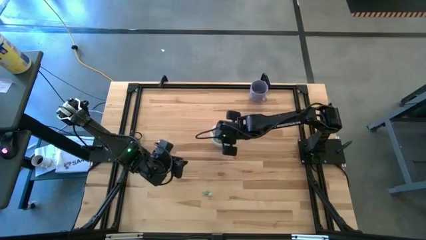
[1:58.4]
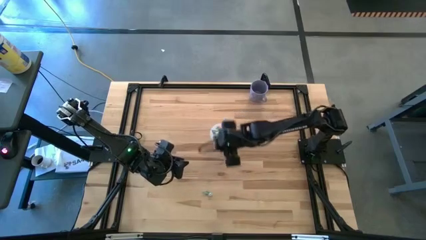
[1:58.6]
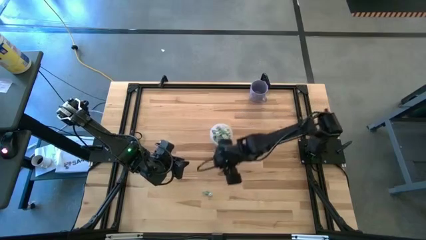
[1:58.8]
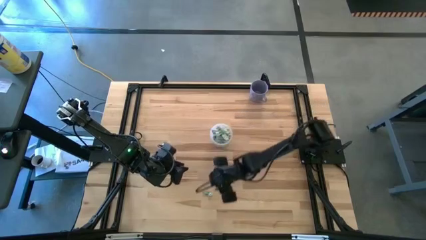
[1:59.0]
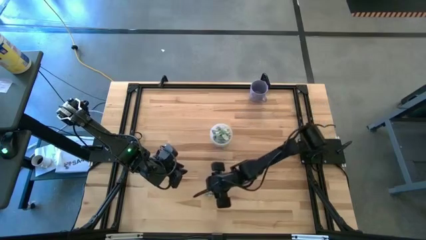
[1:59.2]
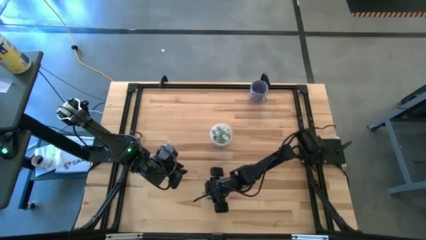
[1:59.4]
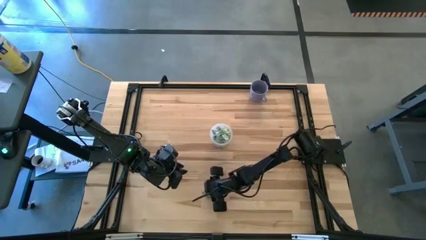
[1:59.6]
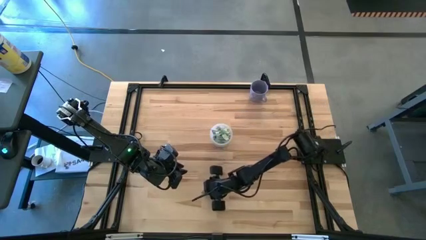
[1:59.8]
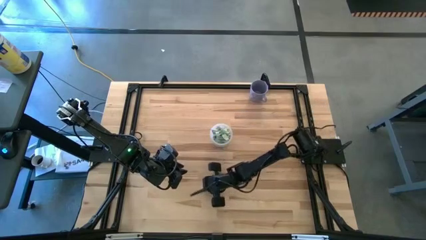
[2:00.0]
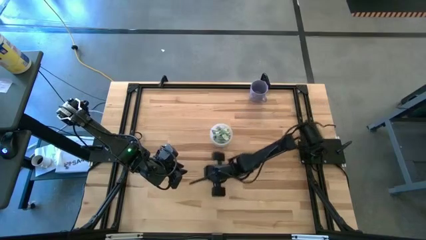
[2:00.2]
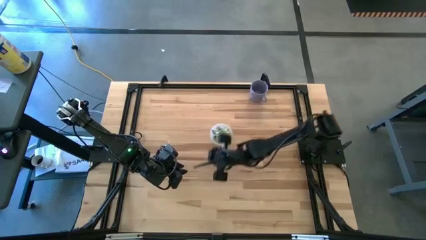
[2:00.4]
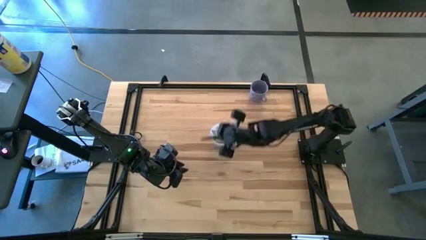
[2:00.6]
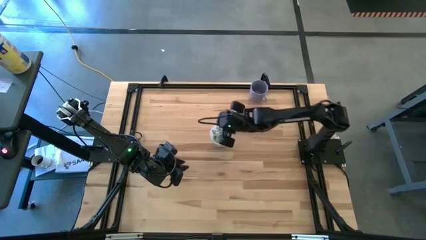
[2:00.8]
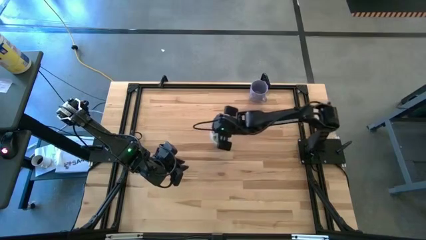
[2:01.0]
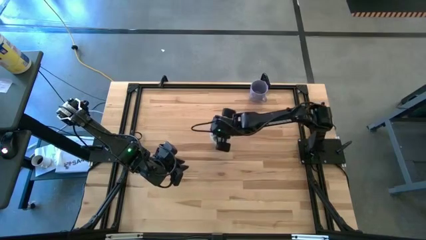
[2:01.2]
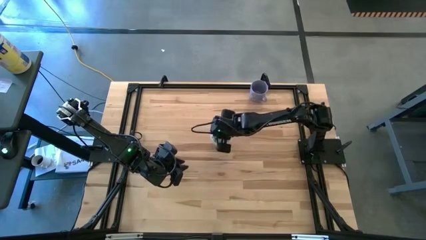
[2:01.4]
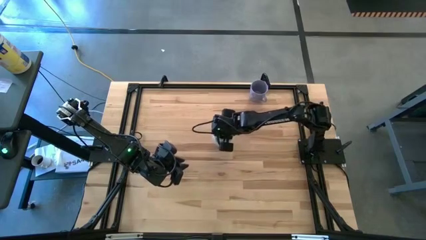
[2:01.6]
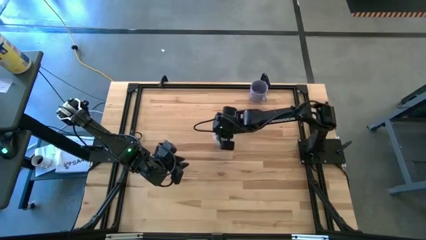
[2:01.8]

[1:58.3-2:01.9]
Task: Pick and place Stevia / Truvia into bins
Put the green stevia packet into the transparent container

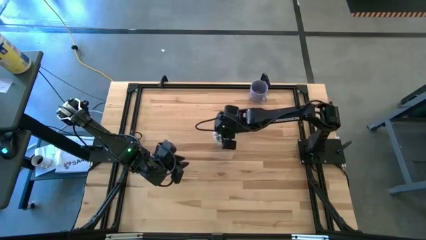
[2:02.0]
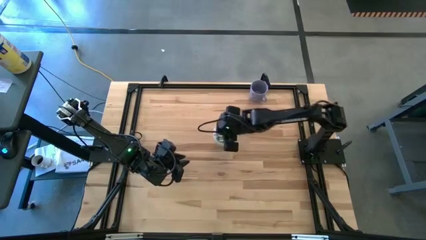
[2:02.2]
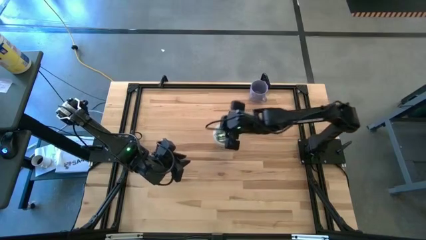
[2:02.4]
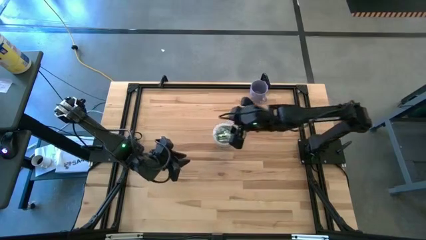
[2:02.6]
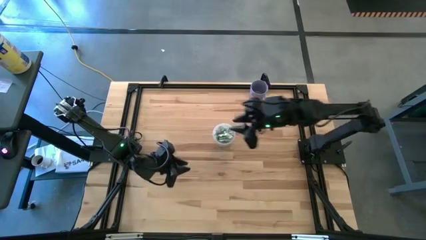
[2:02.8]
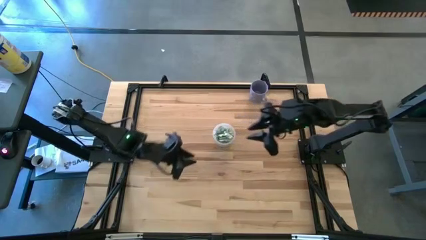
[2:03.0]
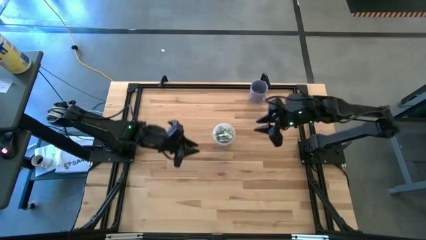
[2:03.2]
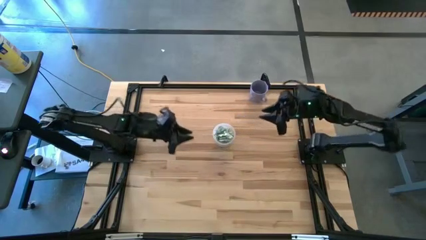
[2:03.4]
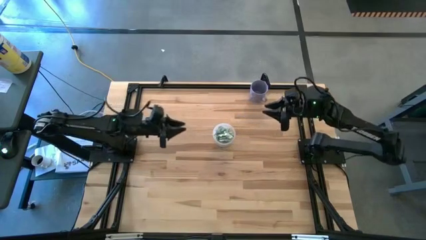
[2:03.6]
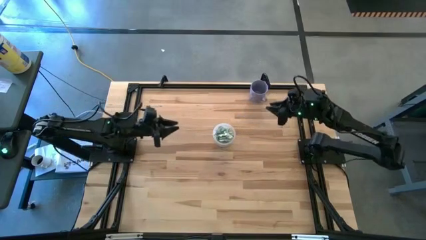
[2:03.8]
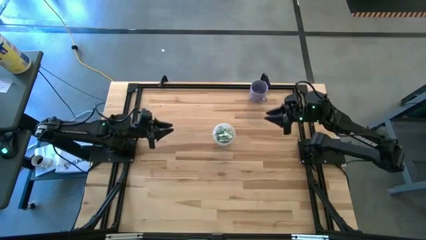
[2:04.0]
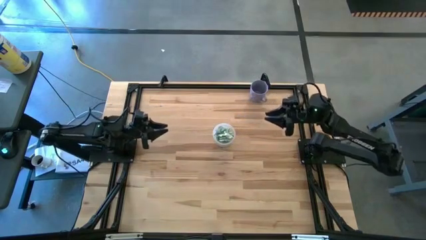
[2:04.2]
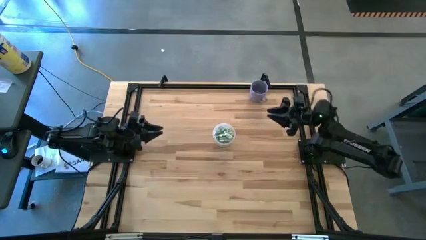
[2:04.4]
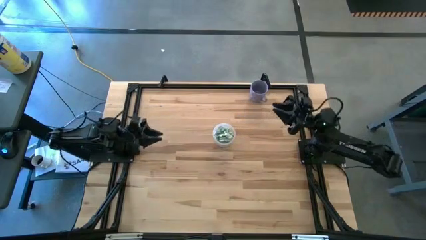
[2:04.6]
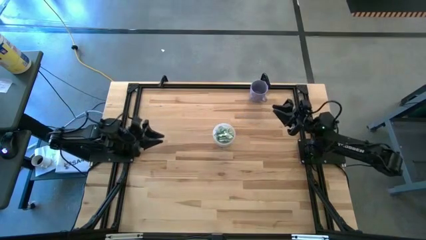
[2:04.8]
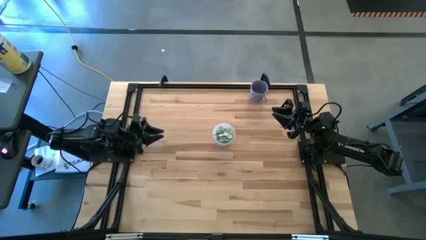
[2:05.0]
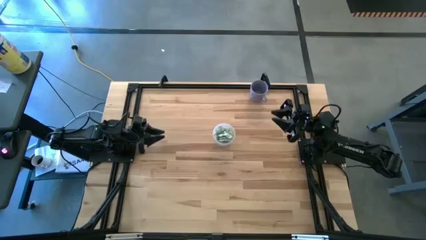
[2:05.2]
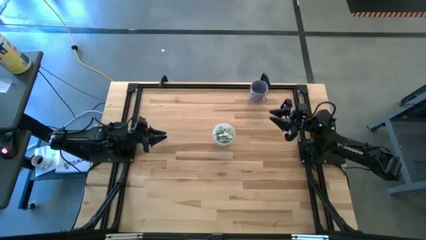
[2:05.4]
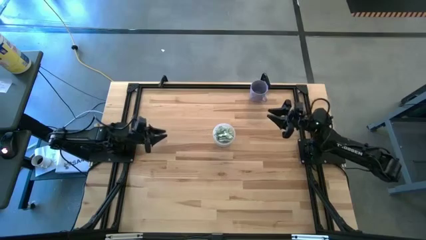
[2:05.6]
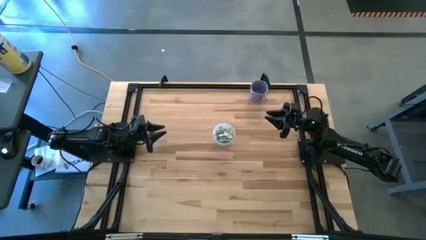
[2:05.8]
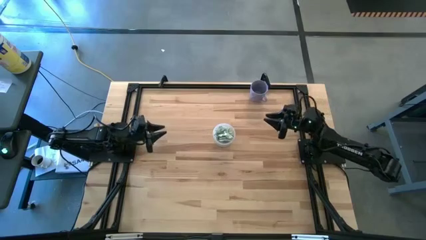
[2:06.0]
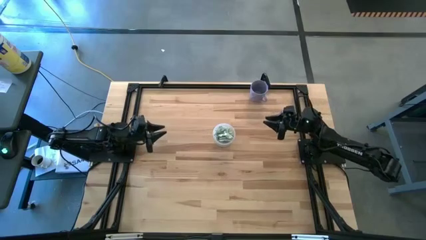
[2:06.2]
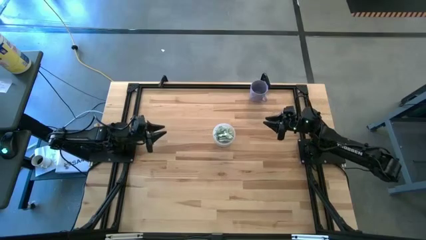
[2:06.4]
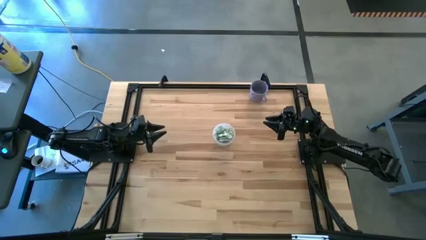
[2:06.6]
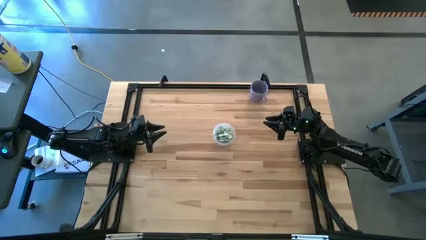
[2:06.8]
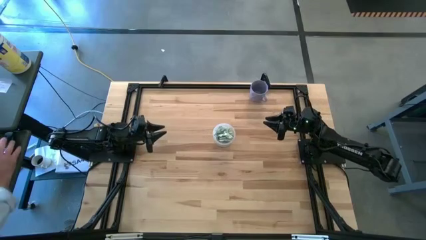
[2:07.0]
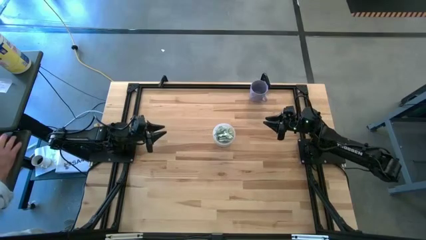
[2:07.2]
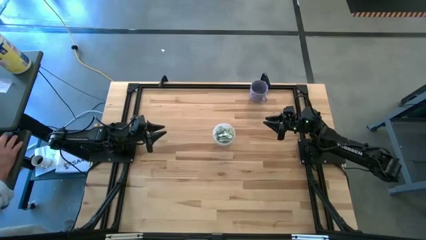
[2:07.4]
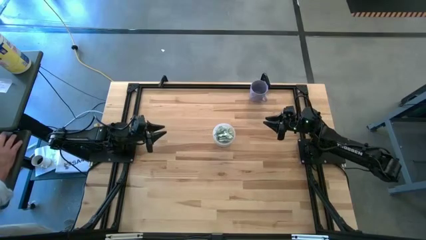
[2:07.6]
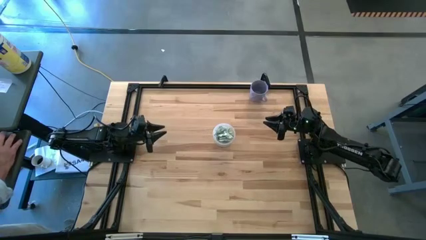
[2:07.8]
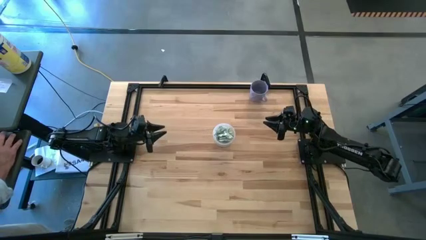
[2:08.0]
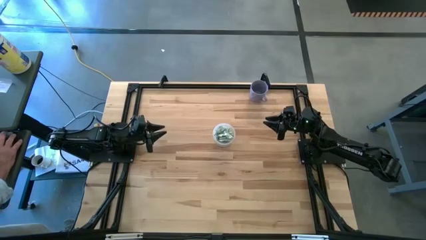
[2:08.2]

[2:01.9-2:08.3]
Return to Home Position

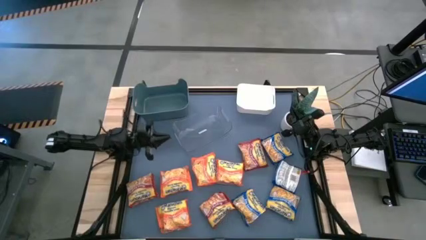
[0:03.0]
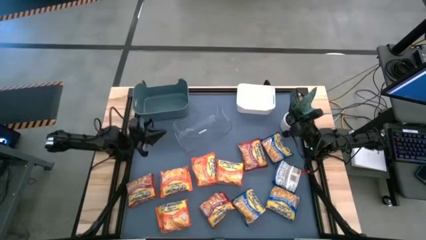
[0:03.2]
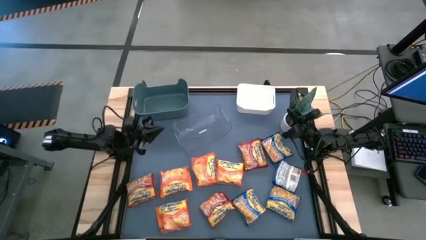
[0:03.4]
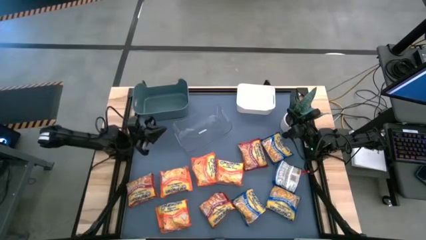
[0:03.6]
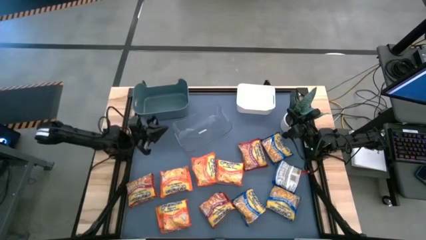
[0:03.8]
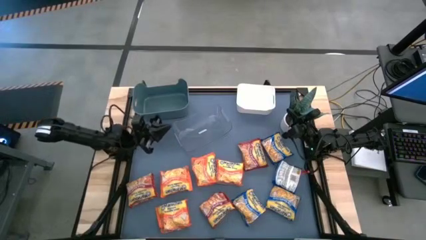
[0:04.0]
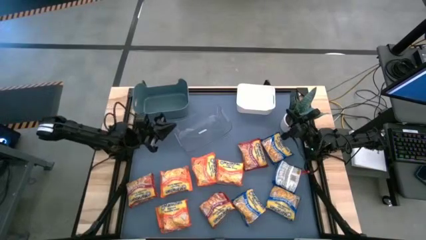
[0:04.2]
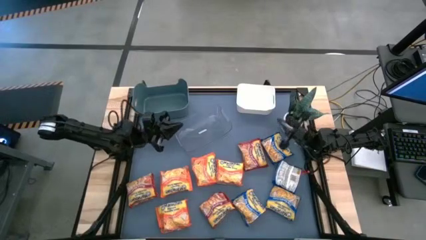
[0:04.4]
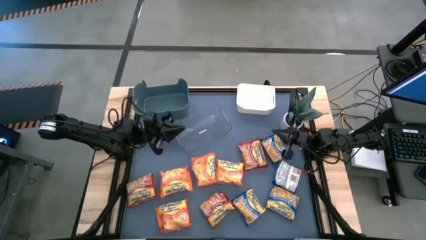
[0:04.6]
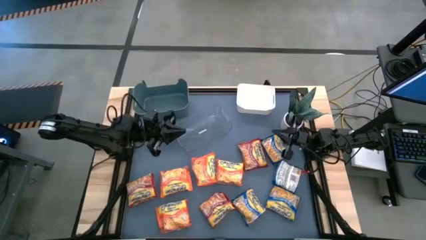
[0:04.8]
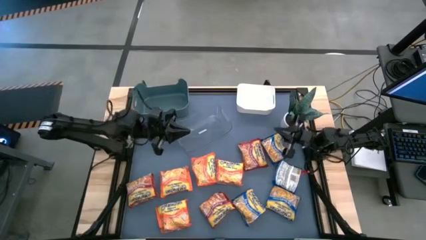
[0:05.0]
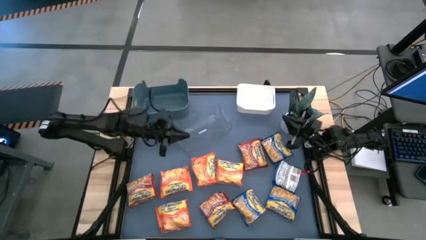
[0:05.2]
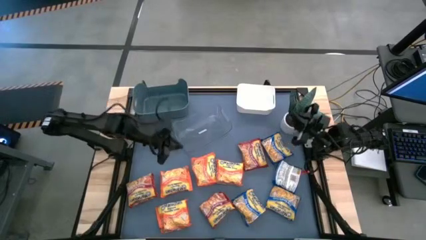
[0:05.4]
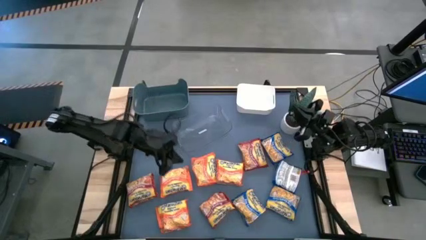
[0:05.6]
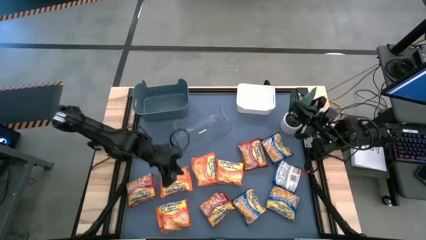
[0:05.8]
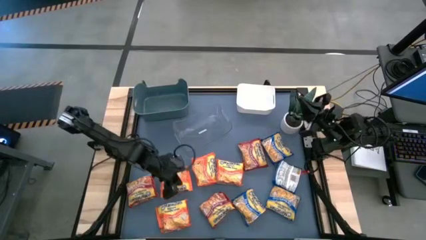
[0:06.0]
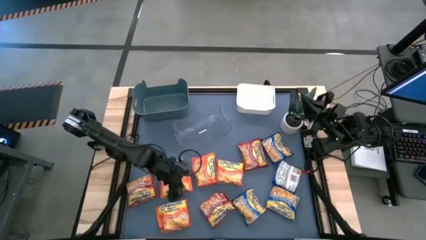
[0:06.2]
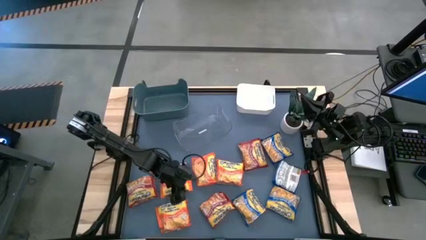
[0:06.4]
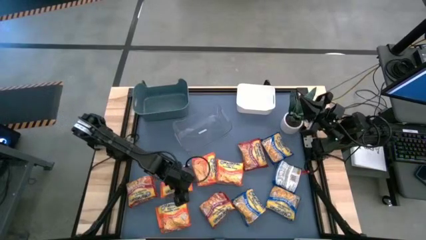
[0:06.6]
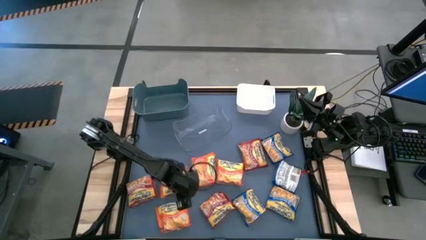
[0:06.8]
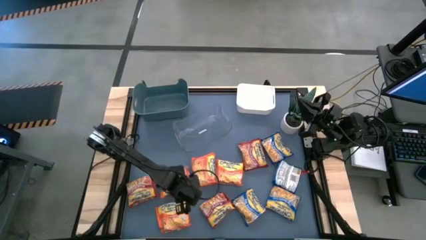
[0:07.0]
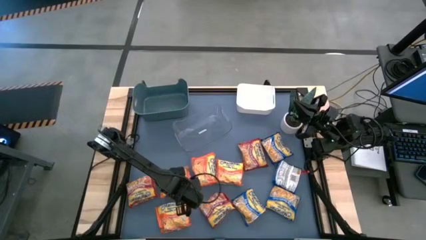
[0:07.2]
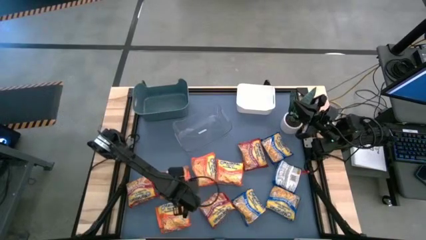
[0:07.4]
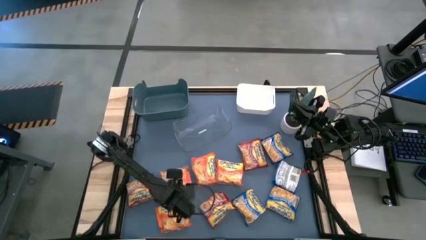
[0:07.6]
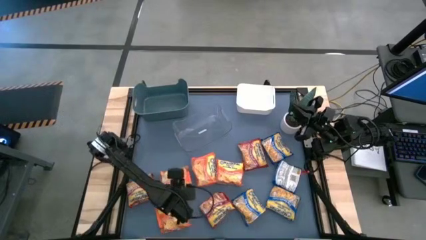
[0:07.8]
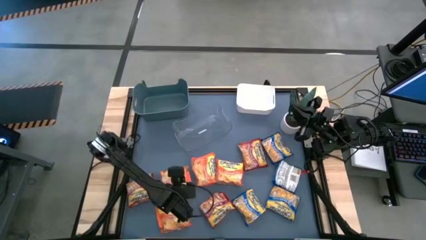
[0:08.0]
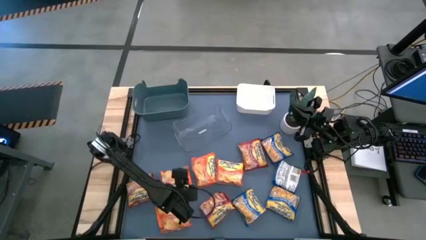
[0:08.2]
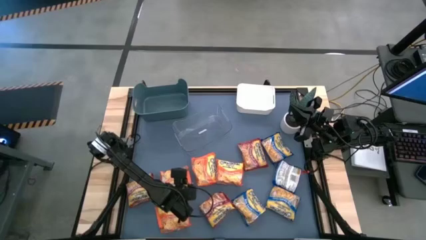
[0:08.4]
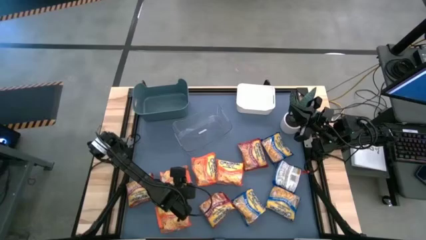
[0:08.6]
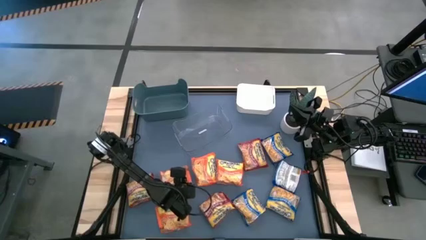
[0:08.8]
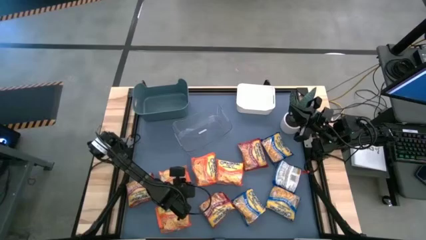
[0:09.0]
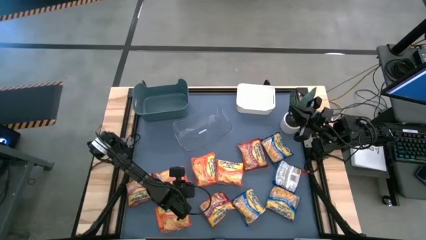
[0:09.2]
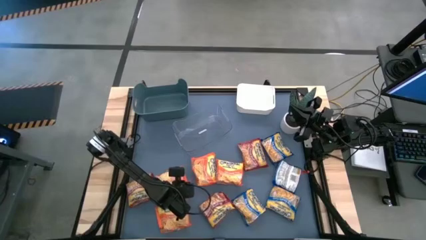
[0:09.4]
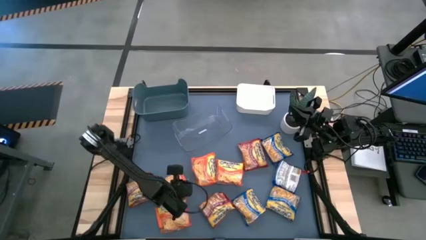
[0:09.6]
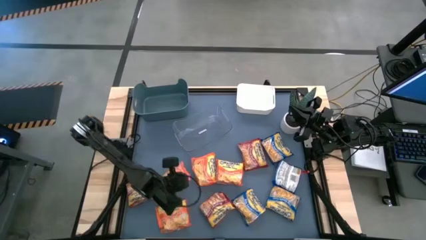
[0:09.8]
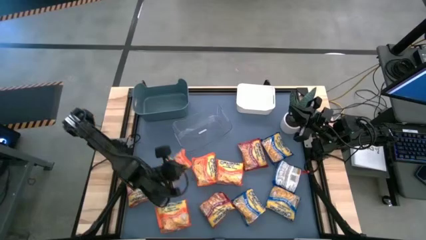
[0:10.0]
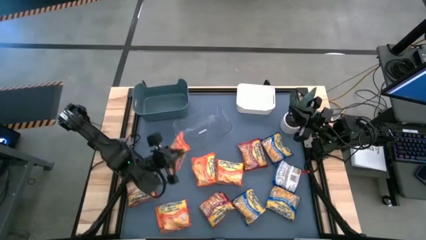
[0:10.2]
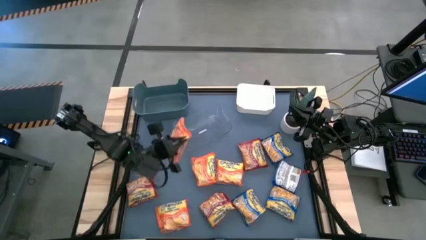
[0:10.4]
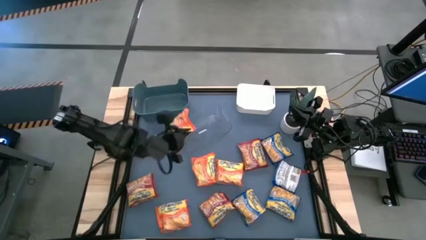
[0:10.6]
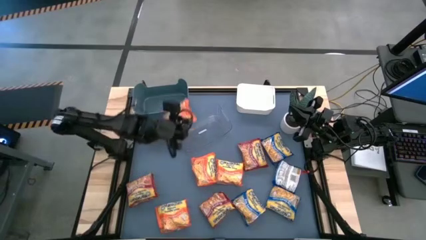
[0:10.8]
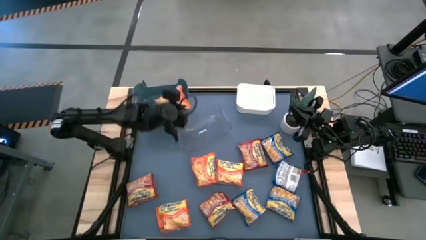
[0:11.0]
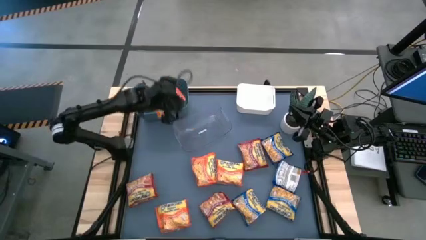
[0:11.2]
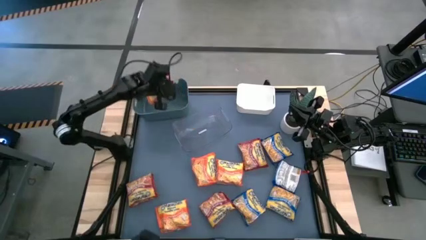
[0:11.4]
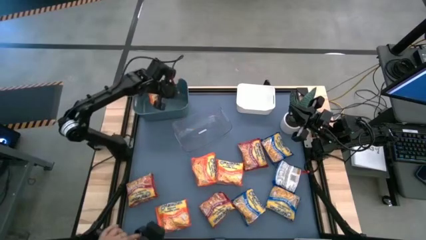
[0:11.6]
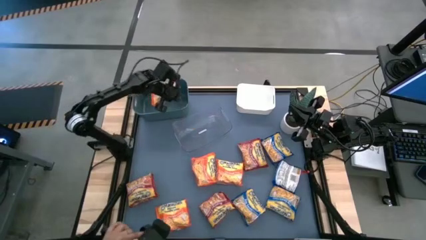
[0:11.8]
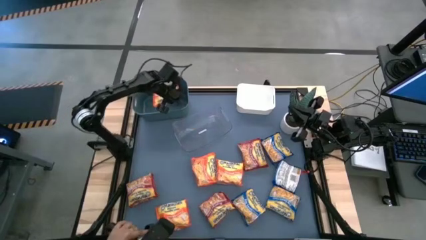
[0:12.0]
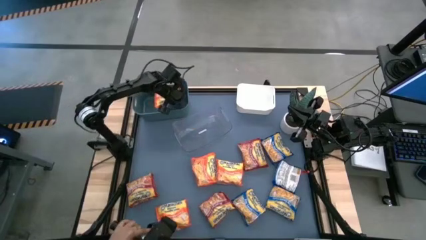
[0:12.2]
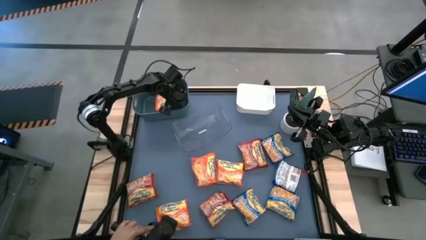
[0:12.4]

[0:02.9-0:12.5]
Task: Sort Maruchan noodles
Put the orange noodle pack into the blue bin
